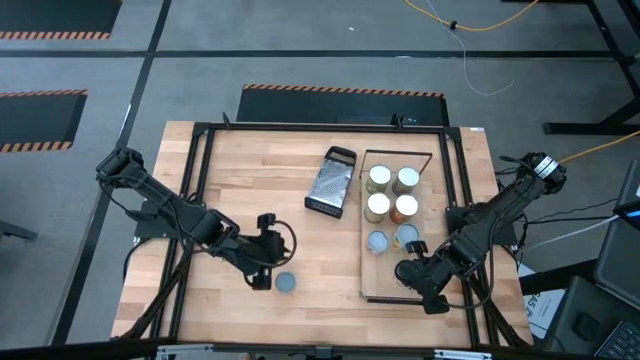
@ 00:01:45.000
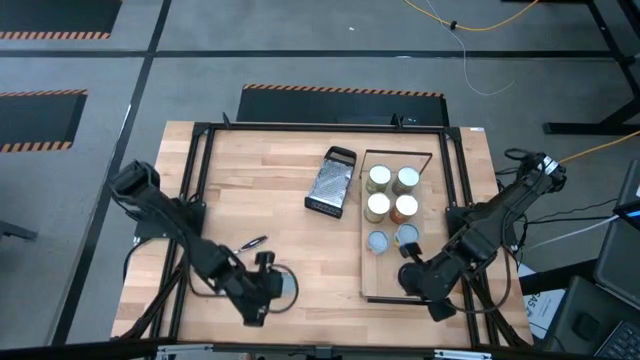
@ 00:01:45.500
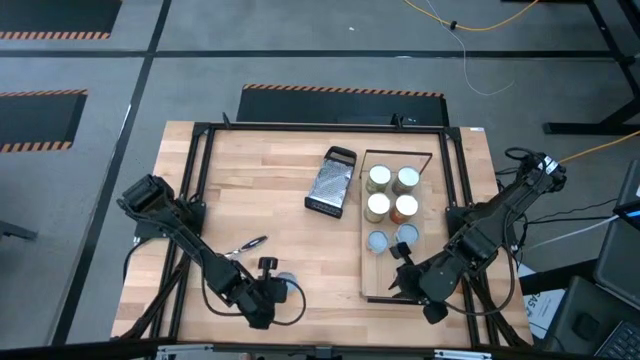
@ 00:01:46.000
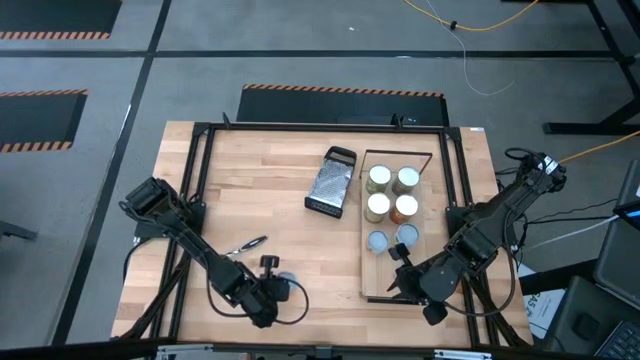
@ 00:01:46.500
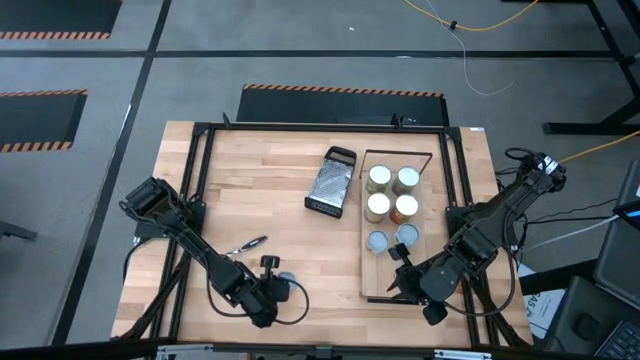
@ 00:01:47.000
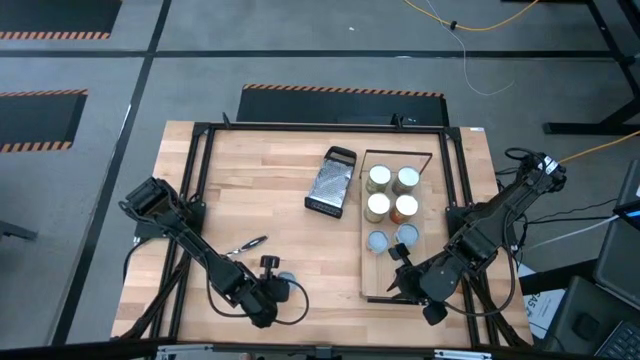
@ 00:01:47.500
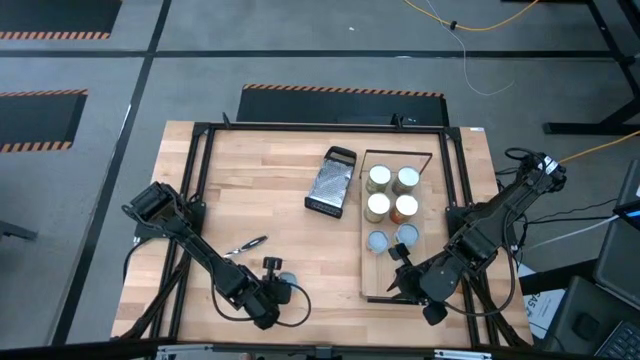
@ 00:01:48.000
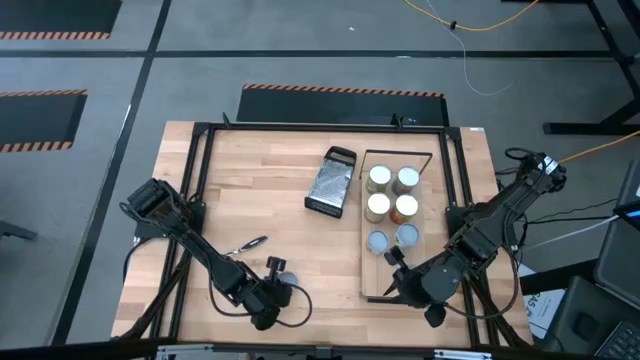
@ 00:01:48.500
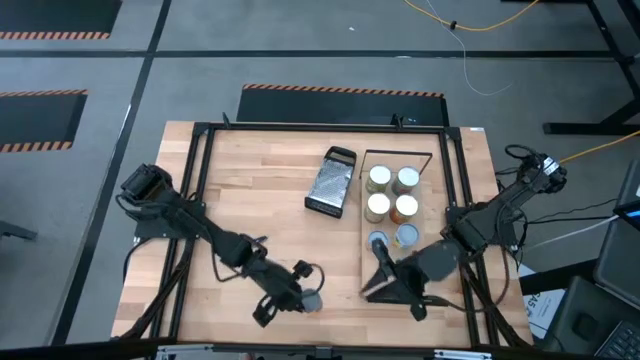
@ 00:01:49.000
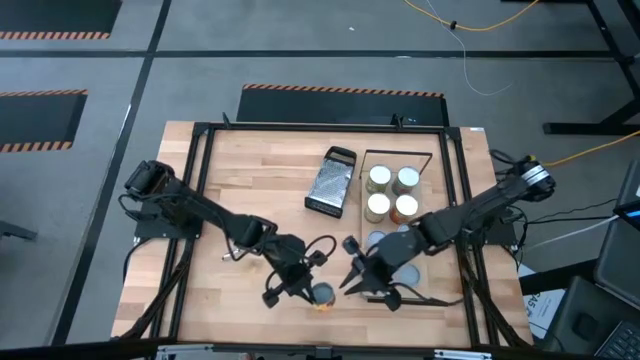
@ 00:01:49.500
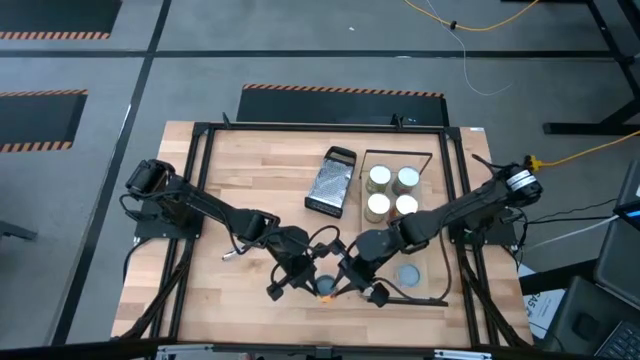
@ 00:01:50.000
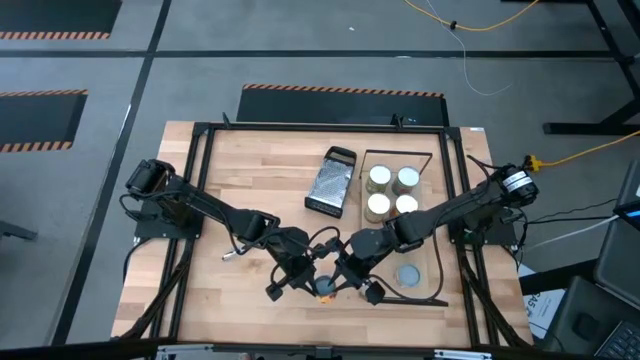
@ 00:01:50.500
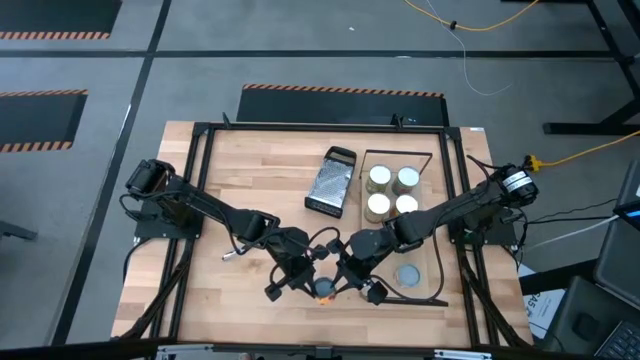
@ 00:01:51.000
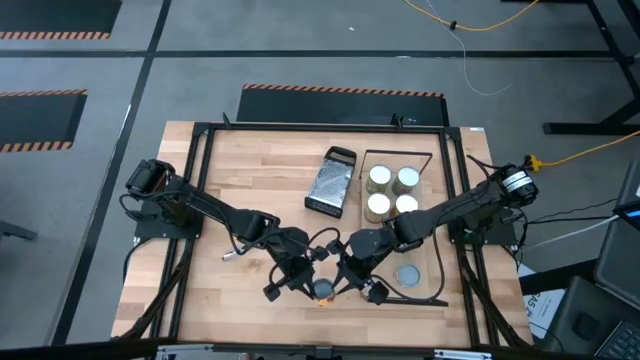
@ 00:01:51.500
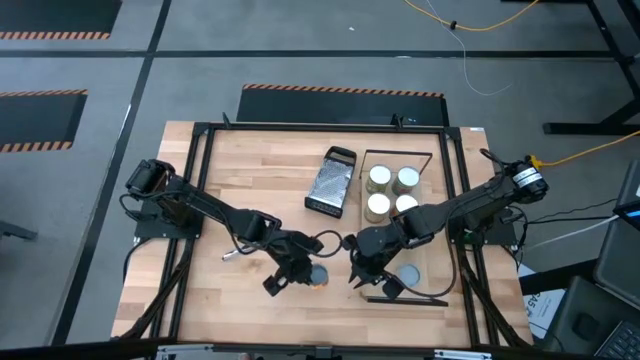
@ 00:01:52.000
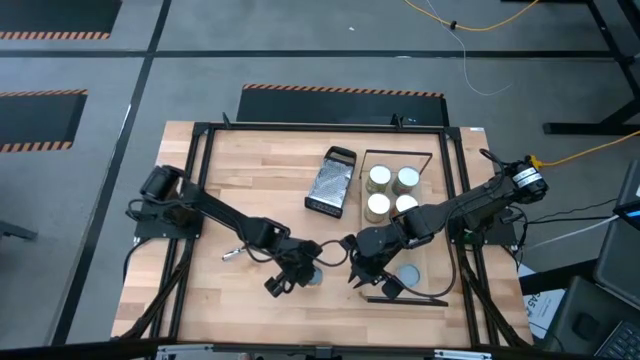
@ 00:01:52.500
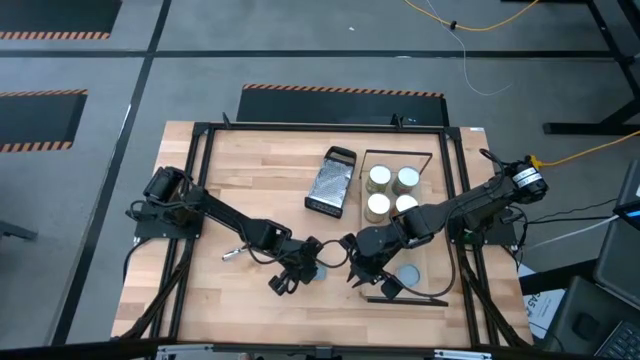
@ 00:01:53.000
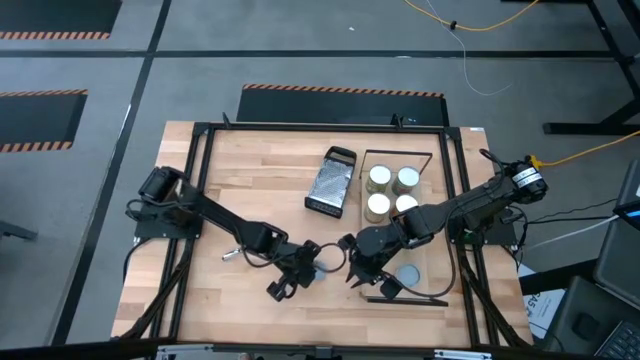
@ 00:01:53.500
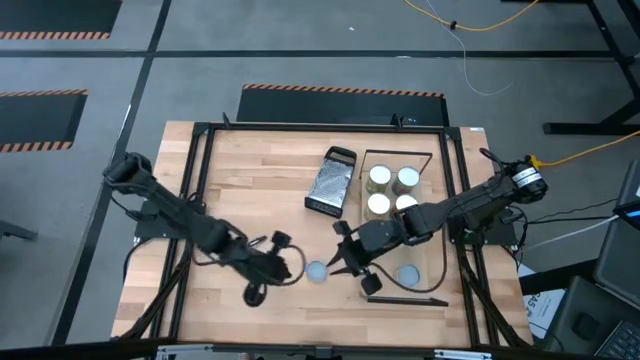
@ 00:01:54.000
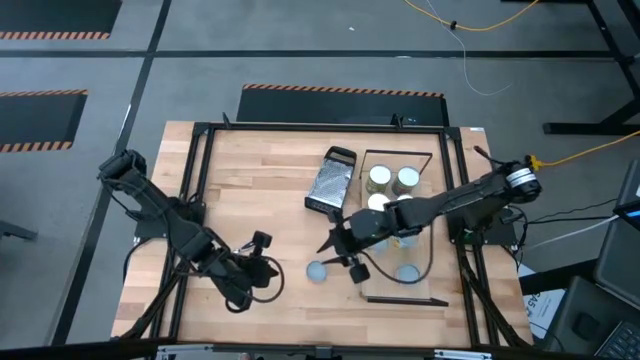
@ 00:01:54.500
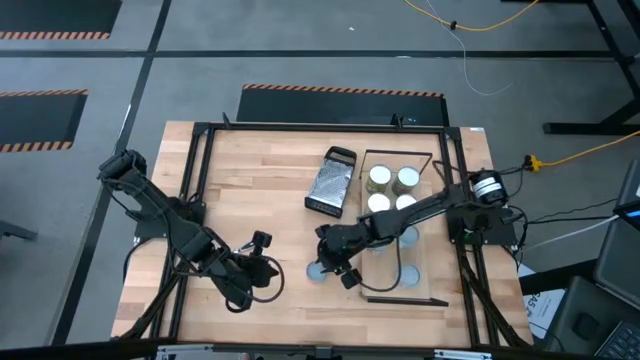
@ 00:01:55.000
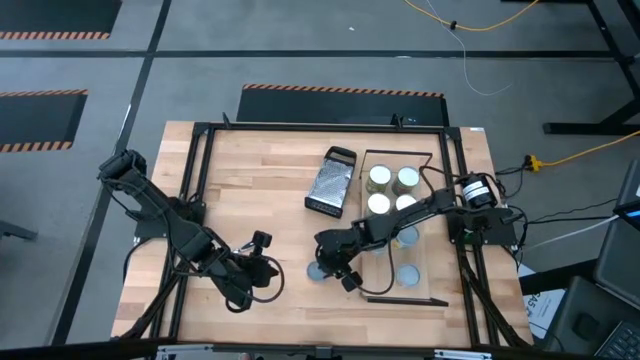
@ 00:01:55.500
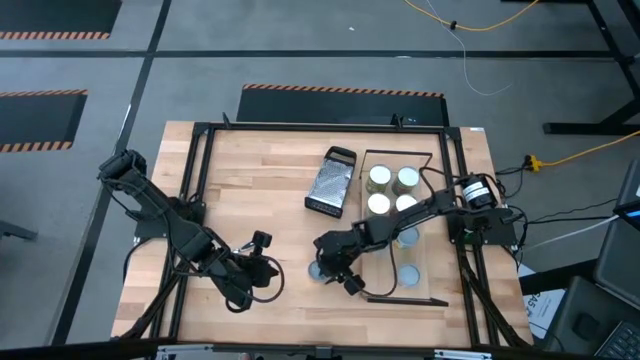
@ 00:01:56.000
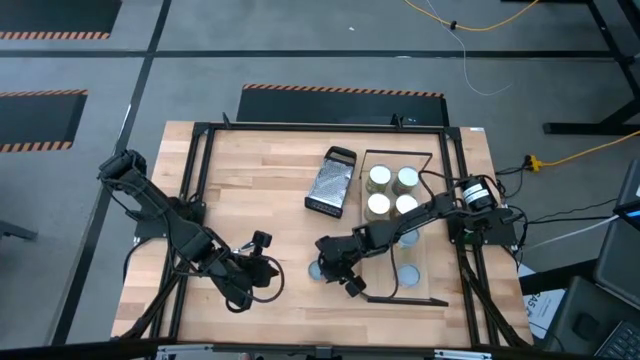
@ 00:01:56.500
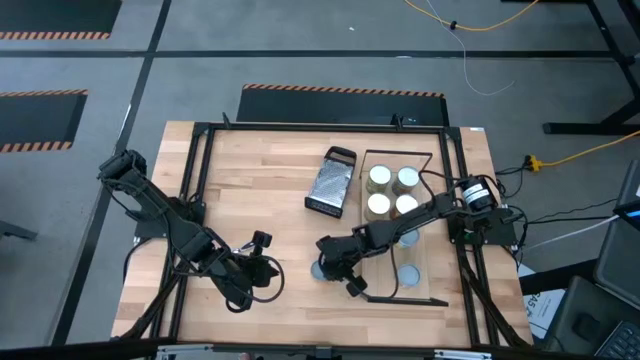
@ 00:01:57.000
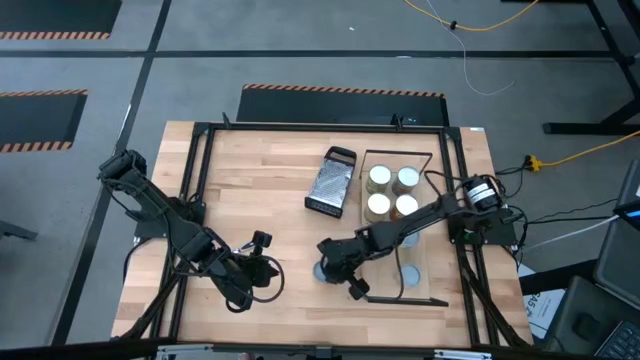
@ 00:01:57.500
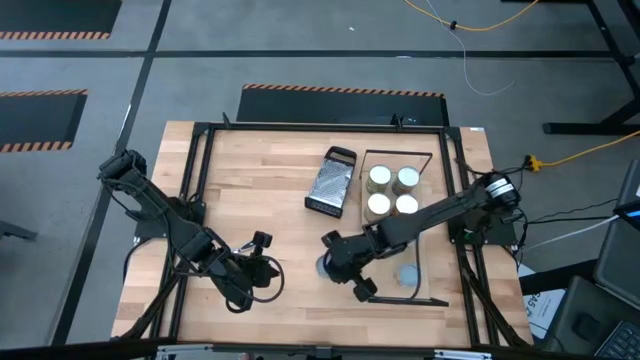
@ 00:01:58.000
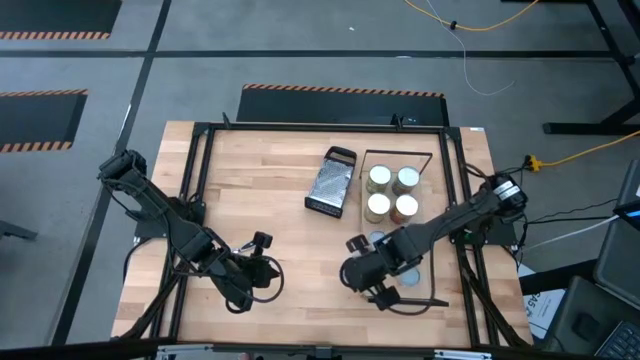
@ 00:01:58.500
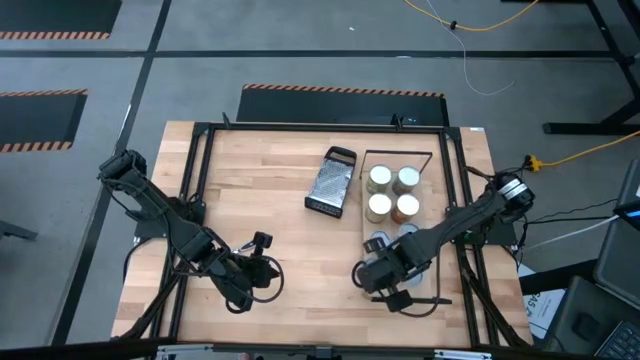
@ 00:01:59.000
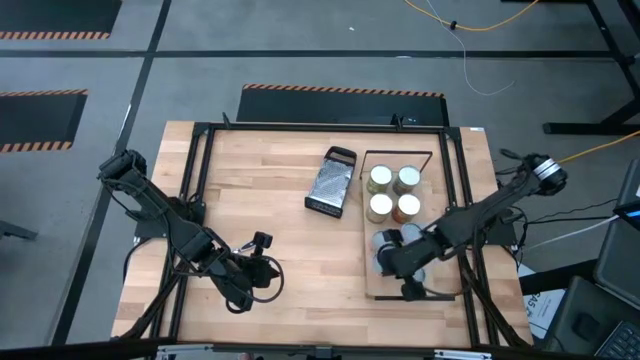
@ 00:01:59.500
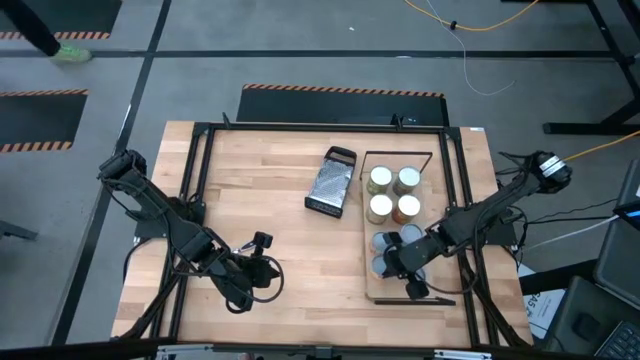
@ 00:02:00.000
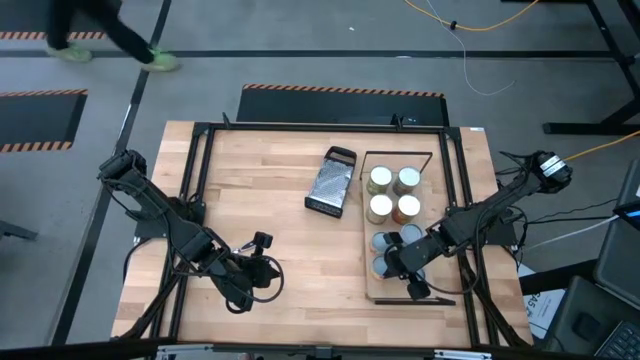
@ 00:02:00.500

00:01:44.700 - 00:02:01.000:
Task: Pick and place cans onto a shelf
Put the canned pineapple rings on the shelf

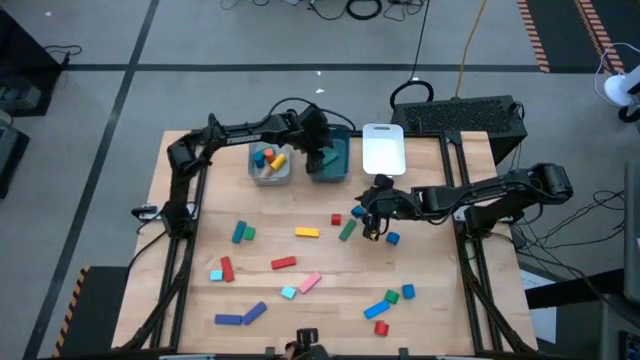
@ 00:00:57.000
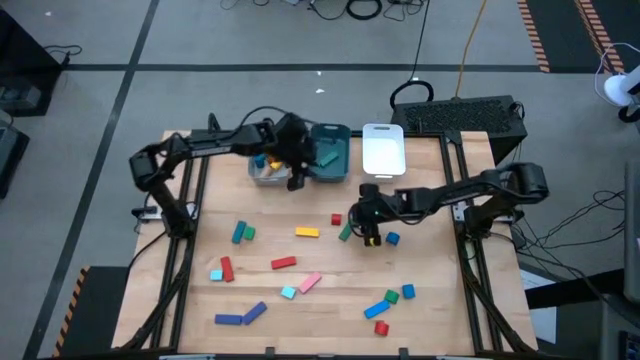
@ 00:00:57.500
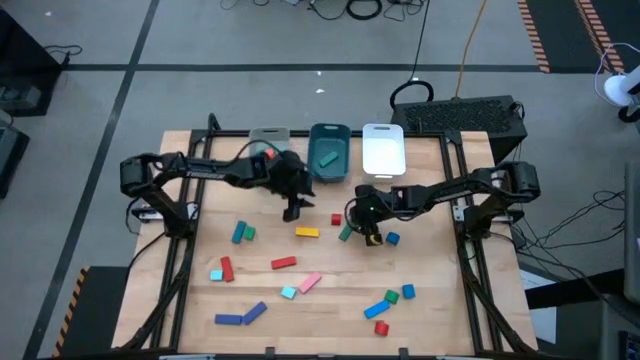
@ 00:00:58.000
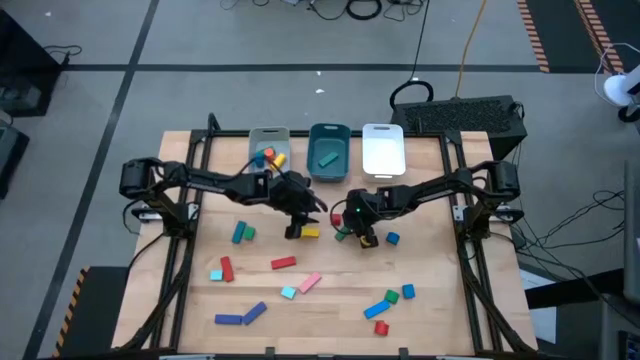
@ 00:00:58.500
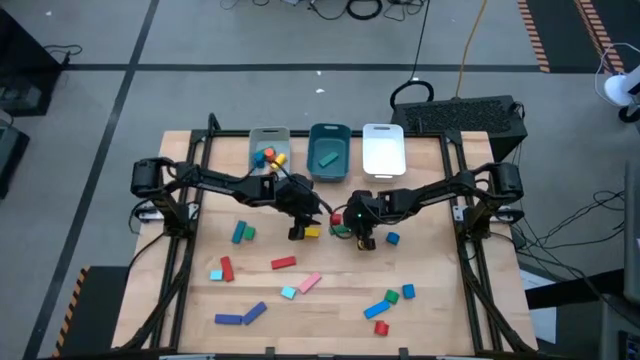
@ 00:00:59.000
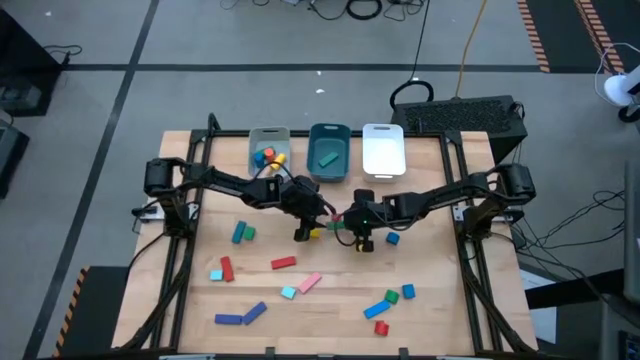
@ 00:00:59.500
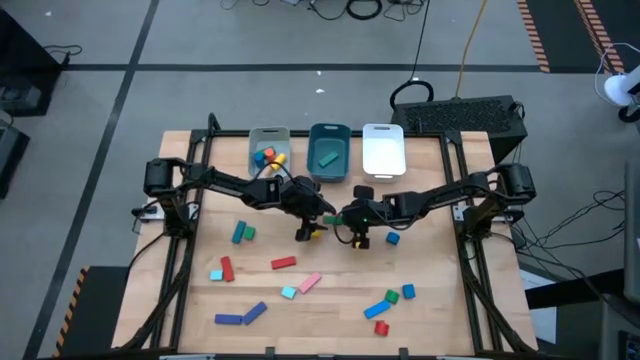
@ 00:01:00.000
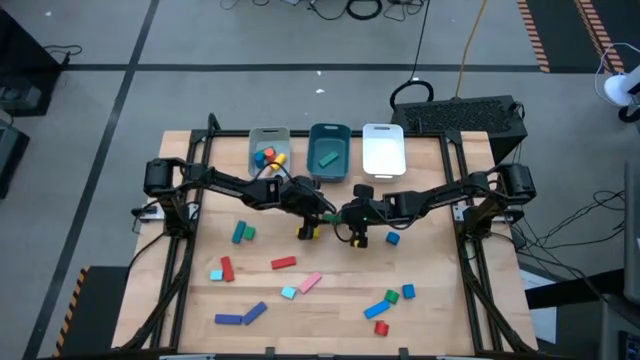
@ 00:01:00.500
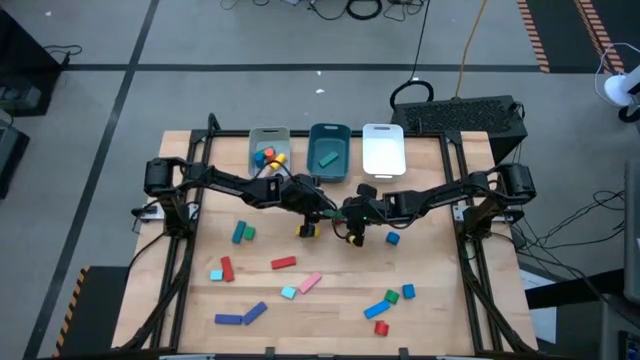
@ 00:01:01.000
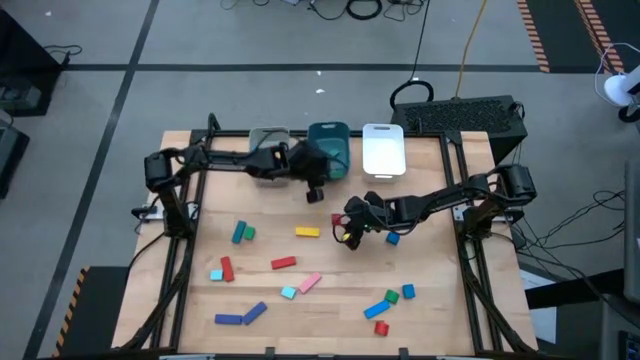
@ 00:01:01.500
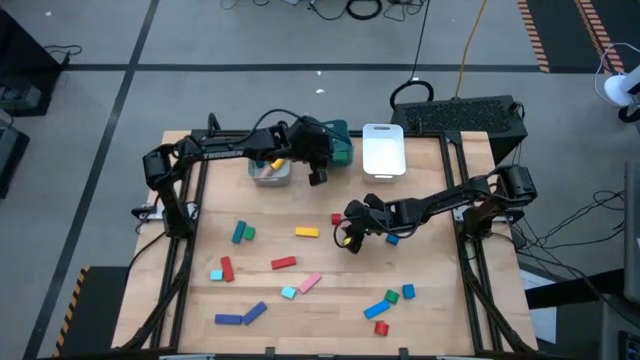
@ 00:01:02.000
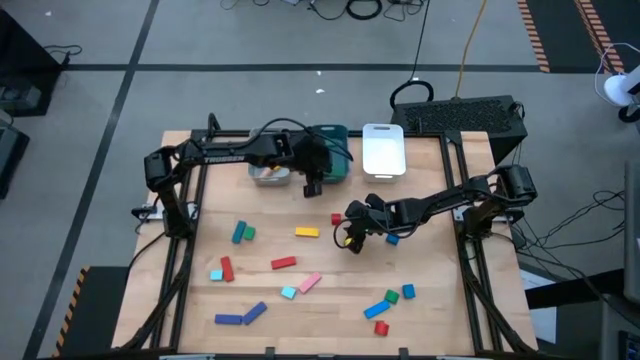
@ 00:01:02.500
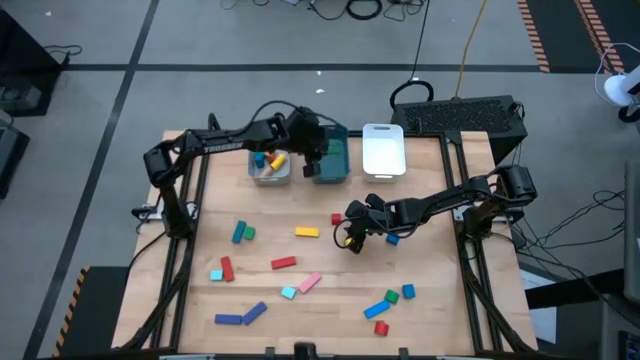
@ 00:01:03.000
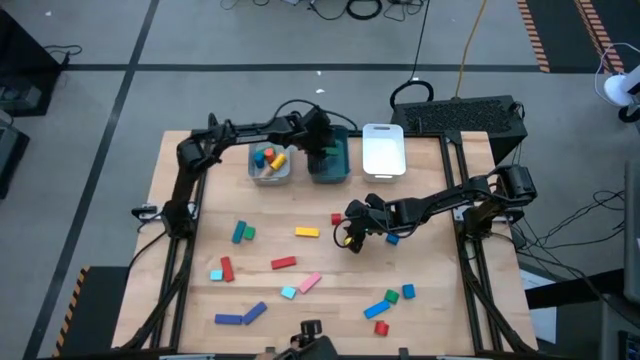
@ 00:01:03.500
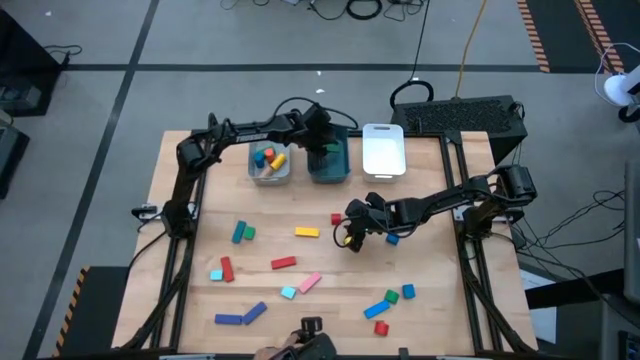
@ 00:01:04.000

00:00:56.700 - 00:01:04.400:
Task: Sort blocks by size
Put the green rectangle block into the blue bin
